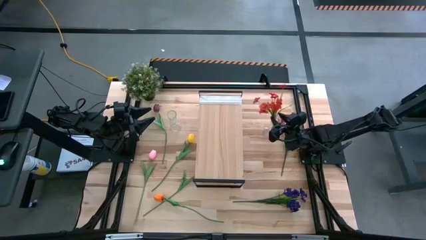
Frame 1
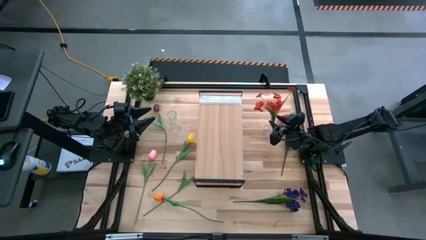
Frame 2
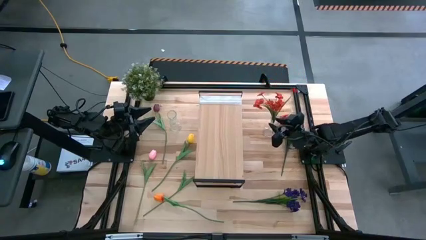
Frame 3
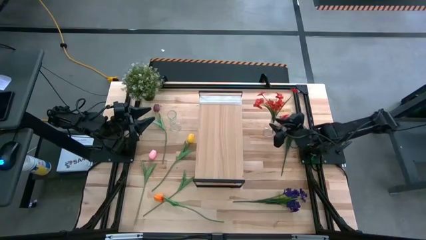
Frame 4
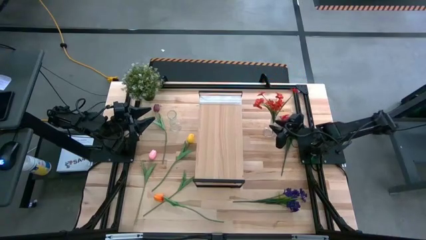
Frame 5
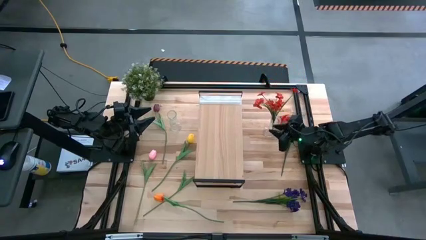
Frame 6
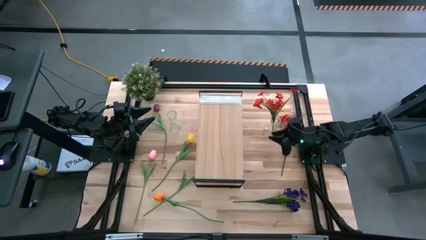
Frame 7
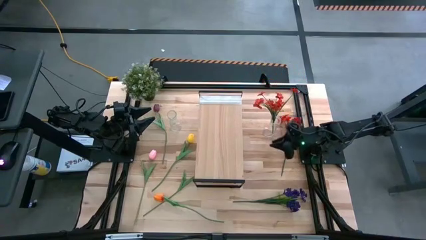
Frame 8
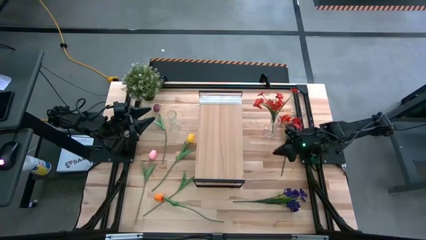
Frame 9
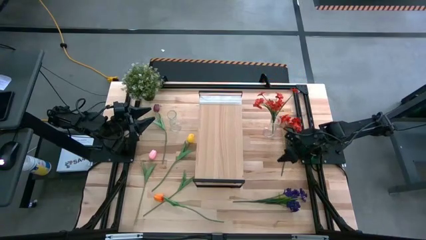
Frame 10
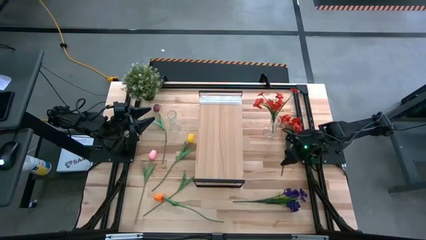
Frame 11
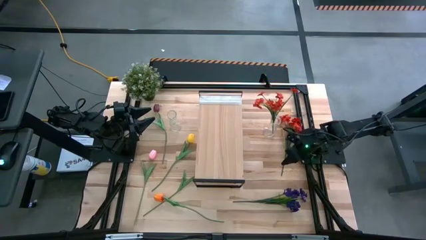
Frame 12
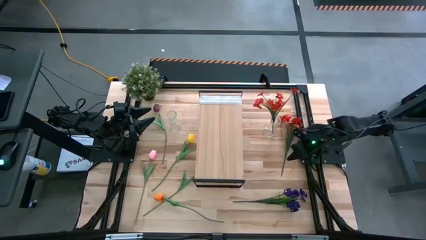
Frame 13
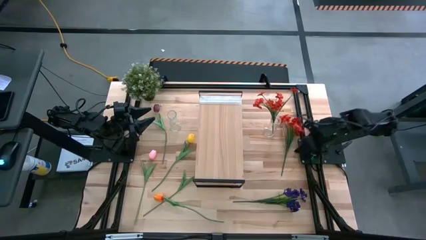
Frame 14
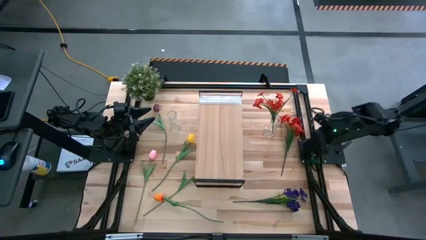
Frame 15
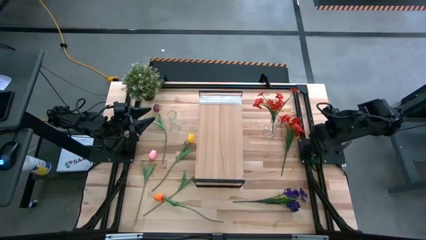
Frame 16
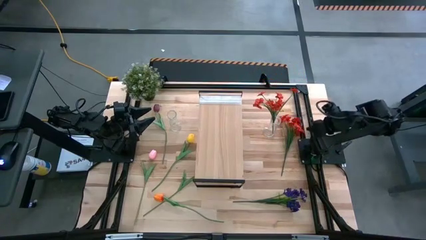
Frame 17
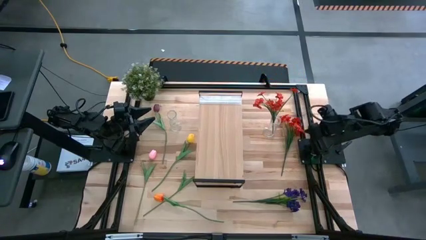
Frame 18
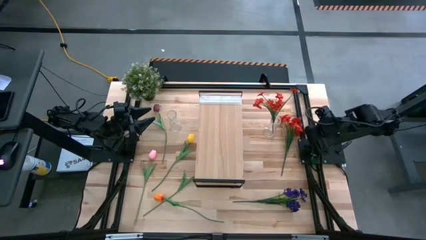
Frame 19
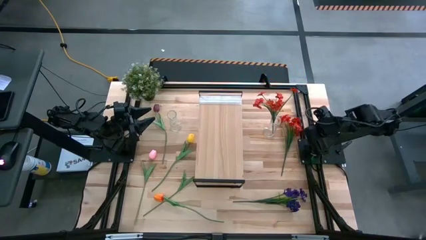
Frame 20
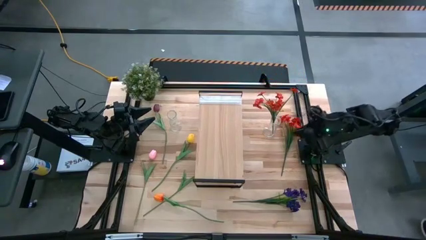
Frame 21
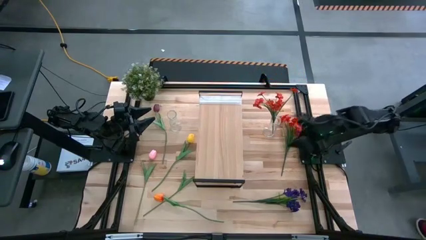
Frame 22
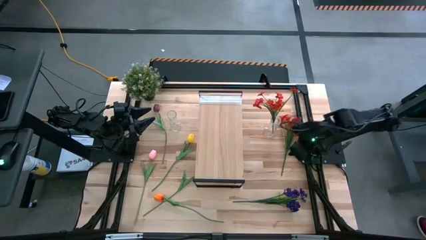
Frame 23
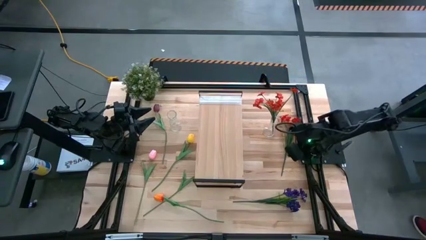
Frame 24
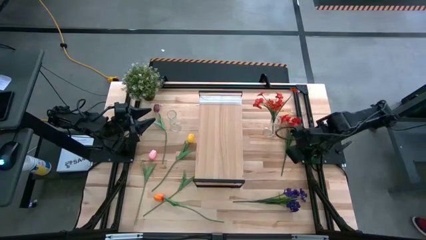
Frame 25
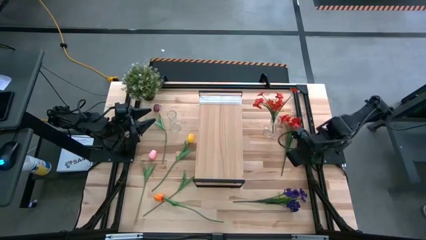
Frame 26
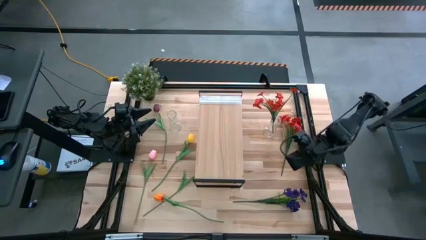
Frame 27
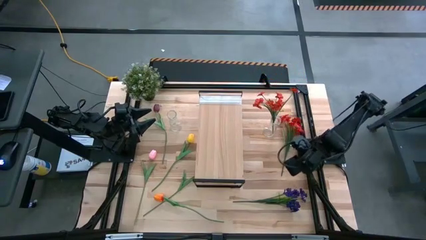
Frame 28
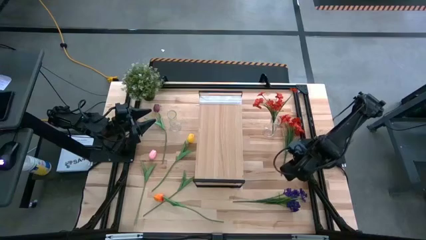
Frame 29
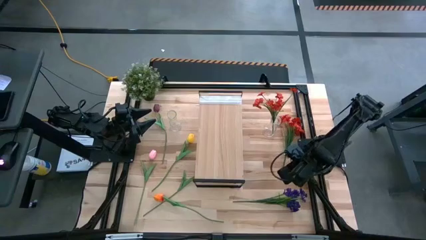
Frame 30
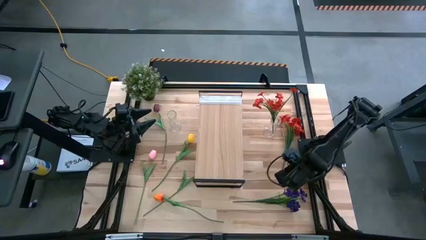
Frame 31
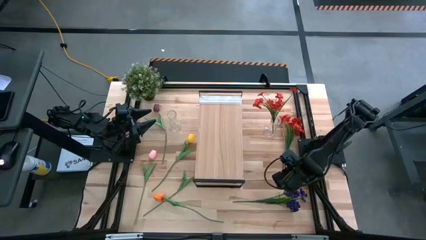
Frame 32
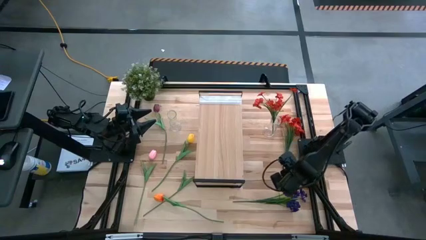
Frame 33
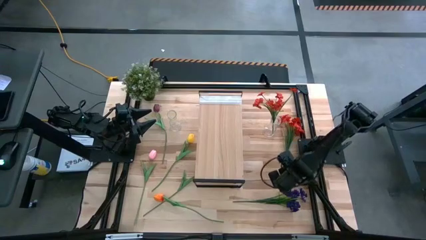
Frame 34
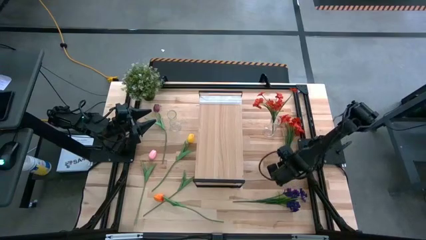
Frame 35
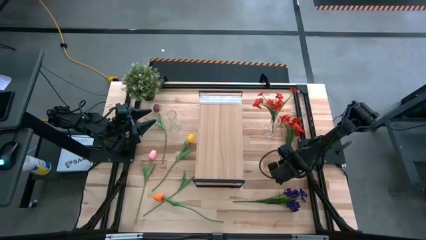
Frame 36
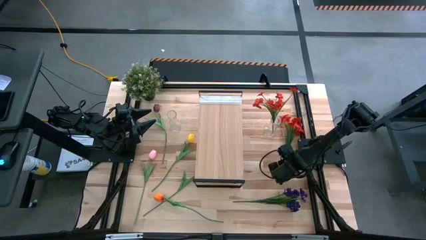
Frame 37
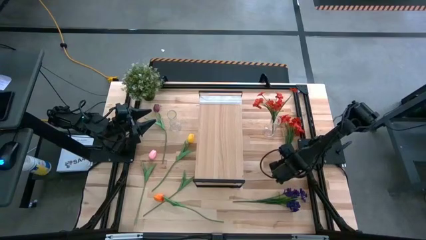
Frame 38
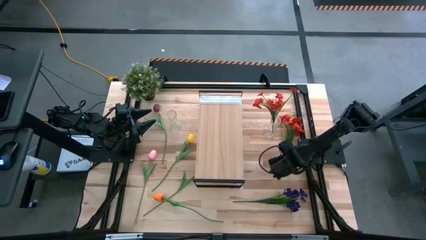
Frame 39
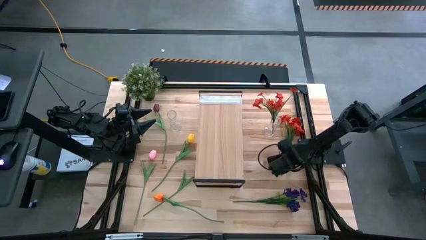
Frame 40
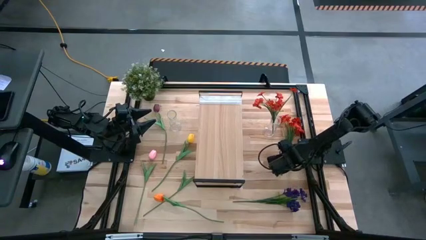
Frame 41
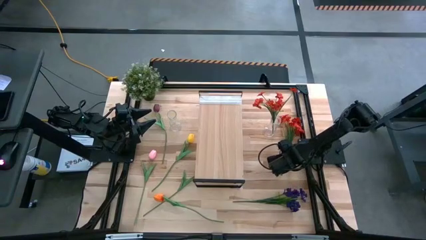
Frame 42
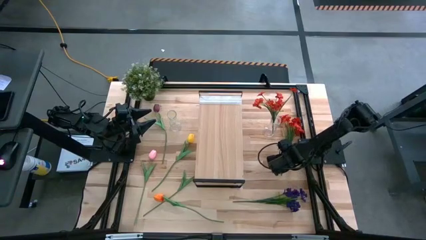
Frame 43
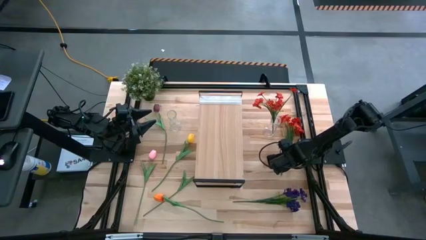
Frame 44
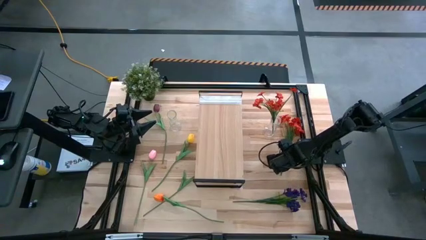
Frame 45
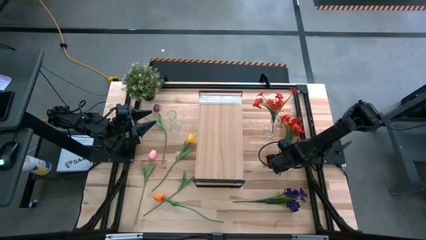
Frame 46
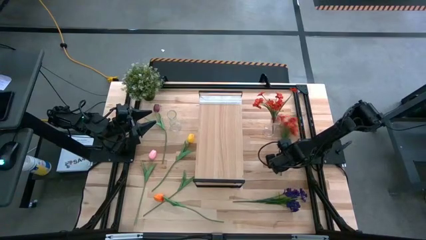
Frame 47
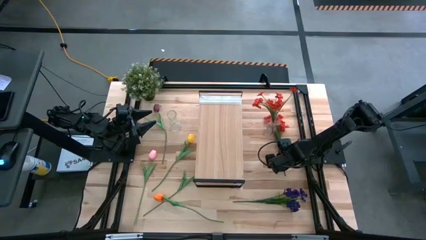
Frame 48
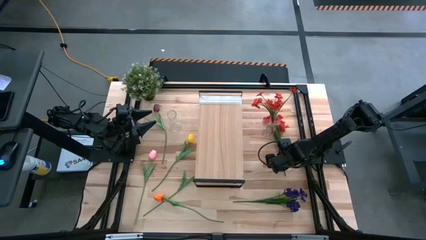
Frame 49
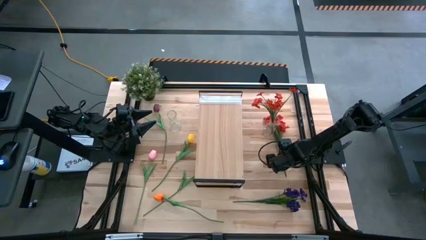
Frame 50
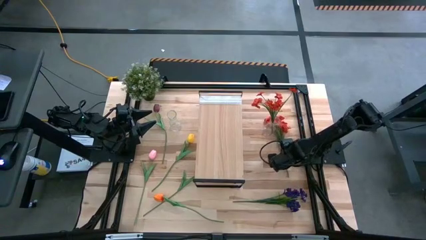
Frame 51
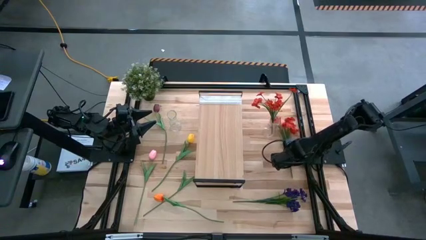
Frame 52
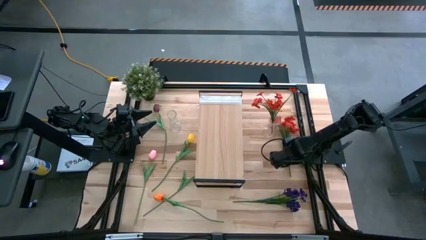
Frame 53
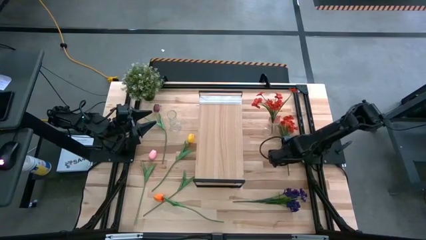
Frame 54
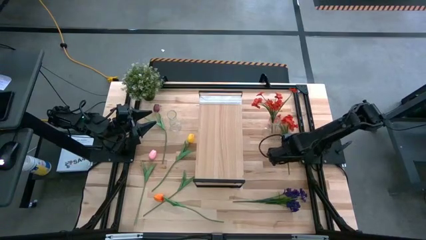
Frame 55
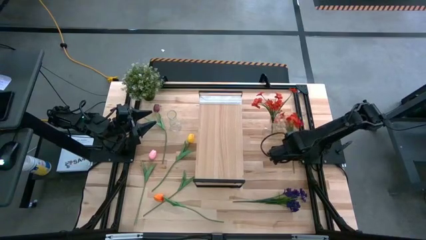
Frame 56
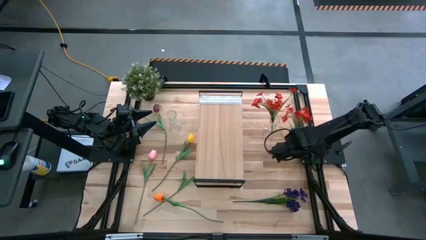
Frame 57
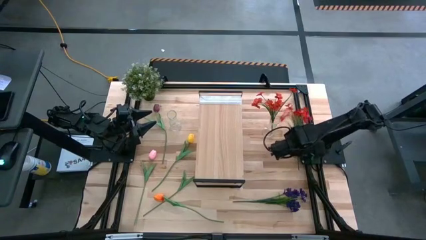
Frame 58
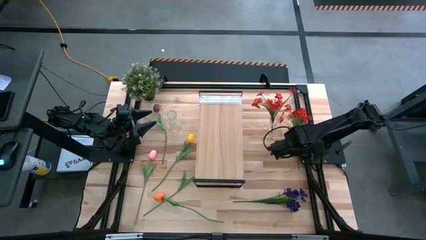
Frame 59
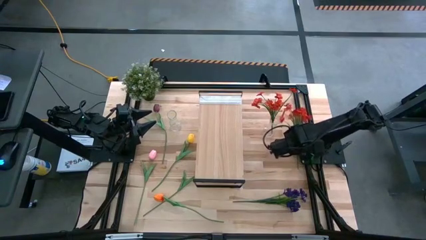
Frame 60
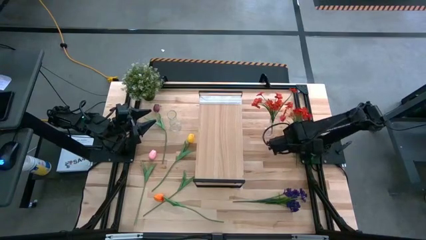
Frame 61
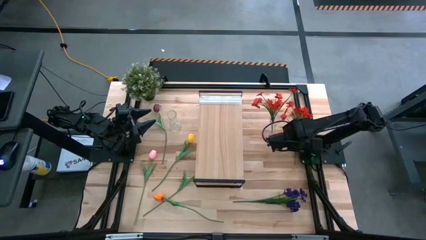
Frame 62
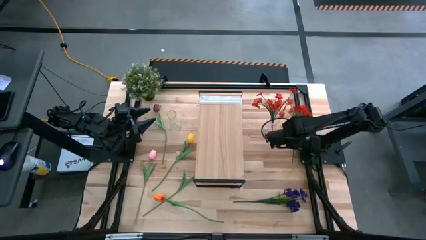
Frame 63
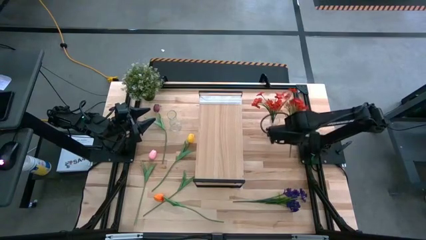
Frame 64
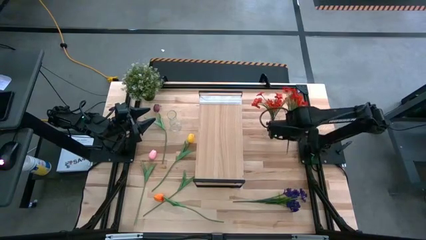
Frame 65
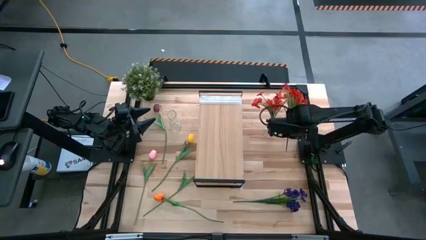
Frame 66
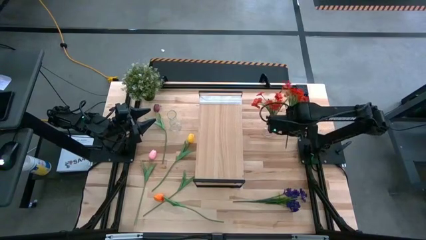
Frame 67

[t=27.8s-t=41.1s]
Task: Pick and place flowers into a vace then onto a shelf
Put the red flowers into the right transparent vase

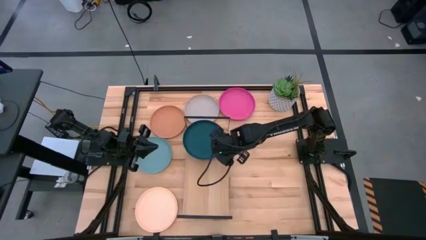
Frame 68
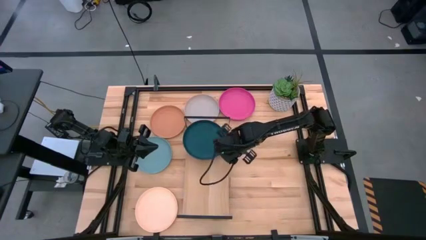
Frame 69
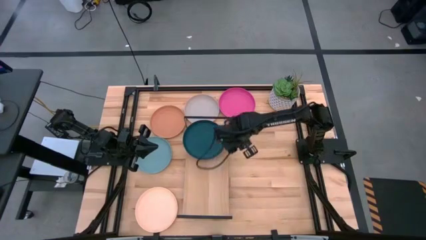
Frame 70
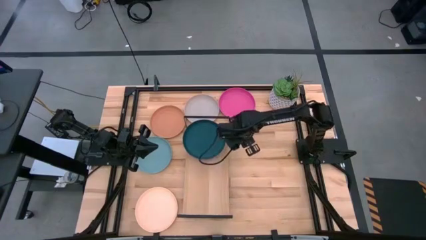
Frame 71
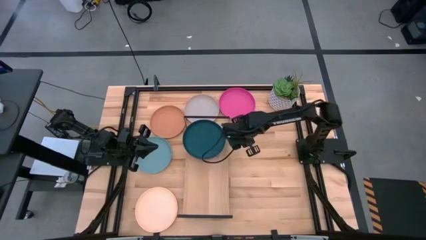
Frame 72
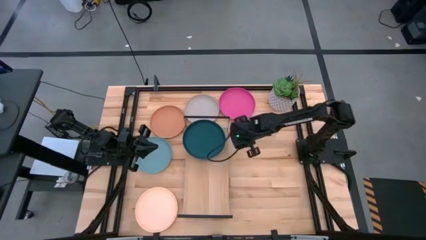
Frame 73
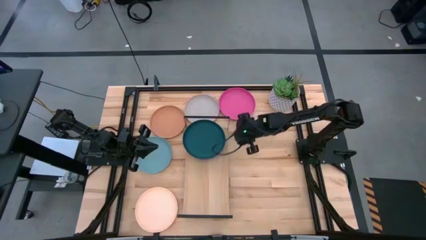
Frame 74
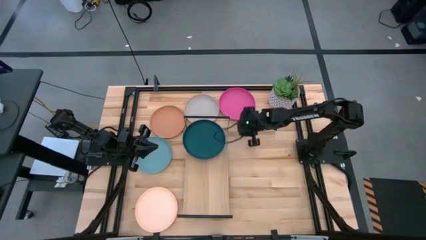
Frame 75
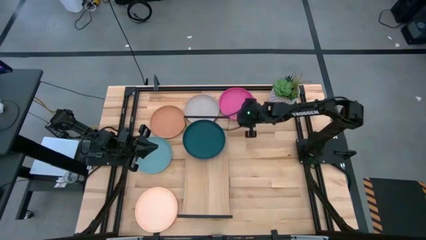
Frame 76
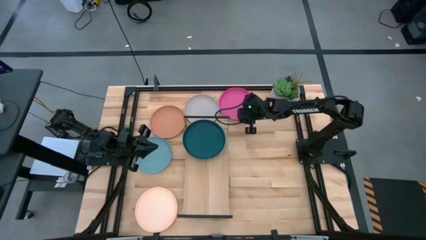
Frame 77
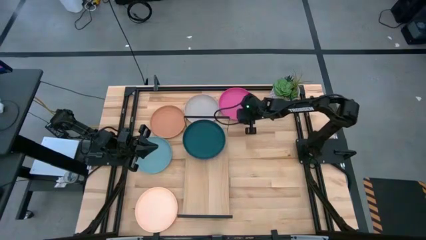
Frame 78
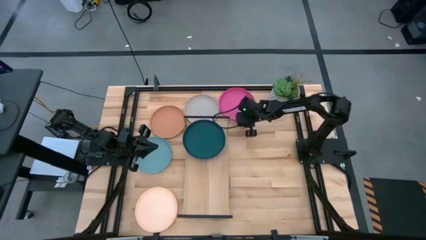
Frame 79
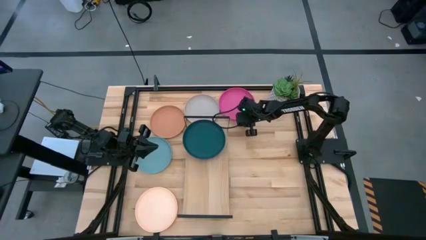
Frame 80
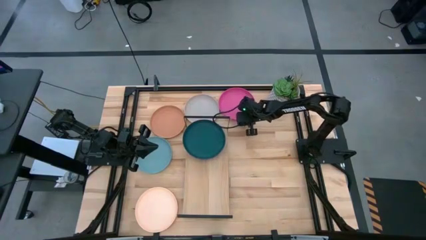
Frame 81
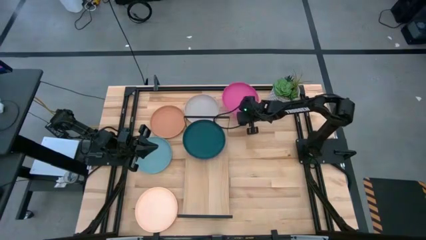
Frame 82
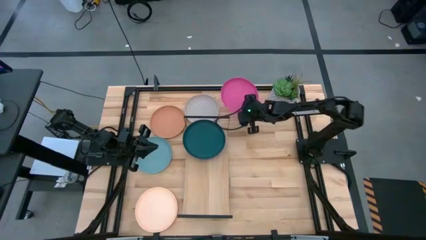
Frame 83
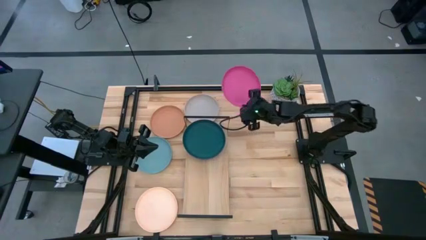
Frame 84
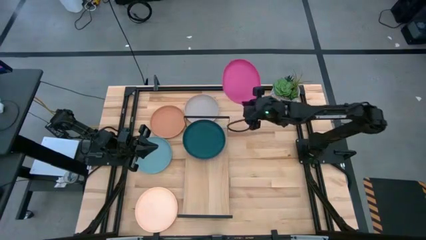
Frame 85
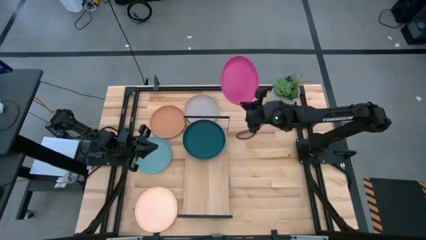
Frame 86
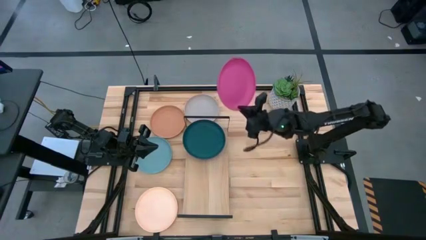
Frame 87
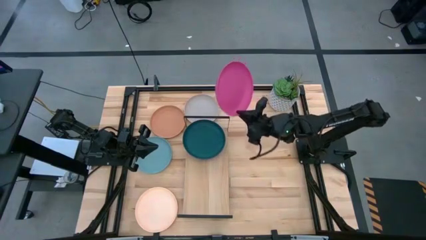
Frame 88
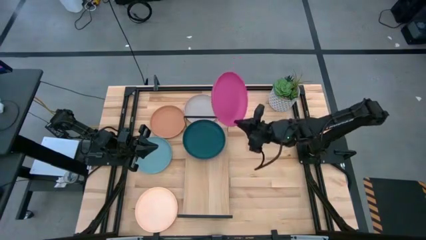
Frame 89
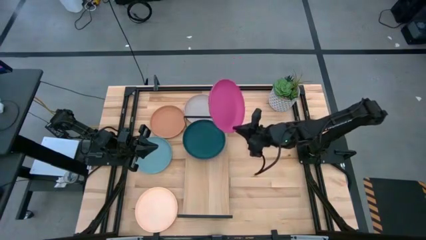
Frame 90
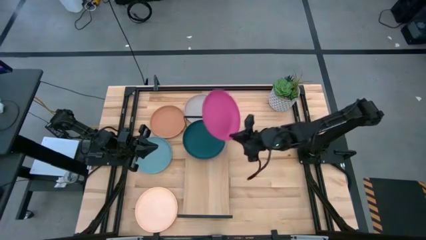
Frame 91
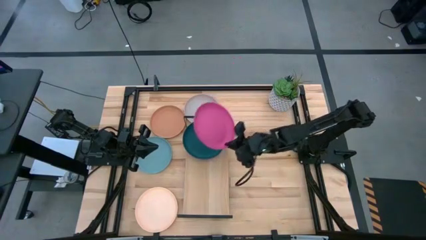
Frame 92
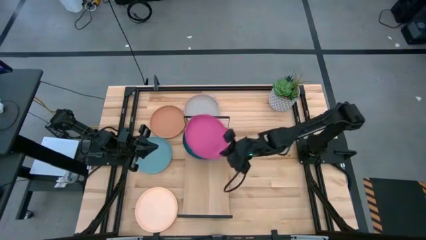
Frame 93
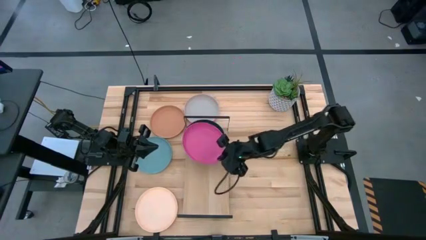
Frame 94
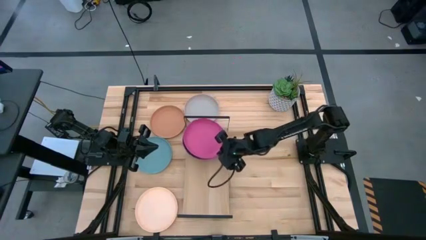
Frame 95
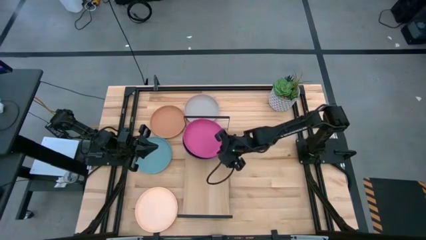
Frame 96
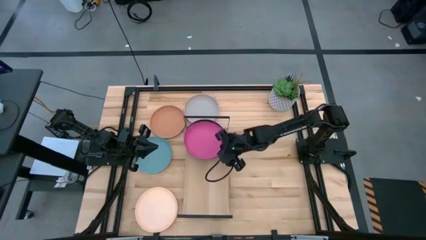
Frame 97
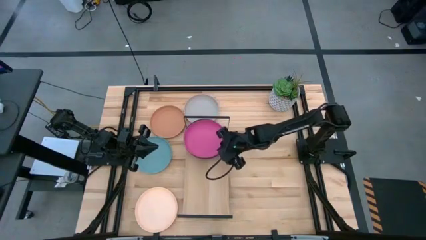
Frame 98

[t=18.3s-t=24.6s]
Task: Place and stack plates onto a shelf
Stack the pink plate on top of the dark green plate
